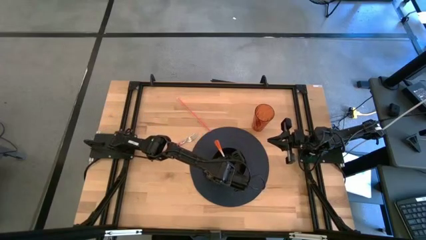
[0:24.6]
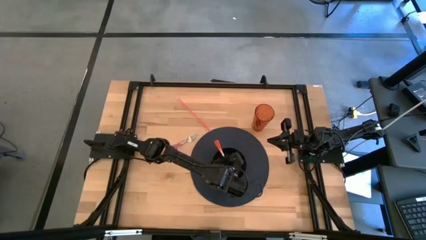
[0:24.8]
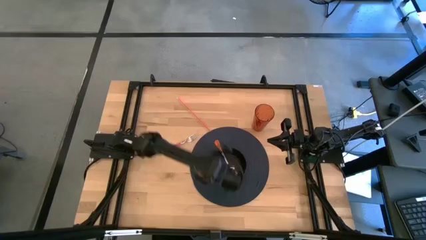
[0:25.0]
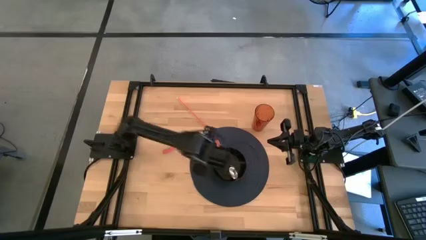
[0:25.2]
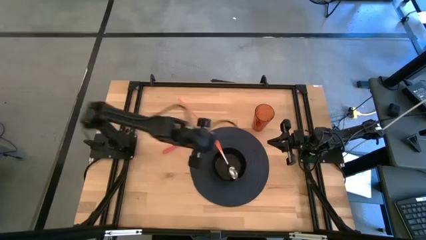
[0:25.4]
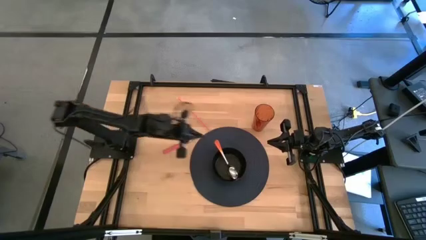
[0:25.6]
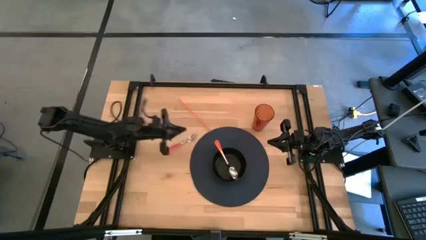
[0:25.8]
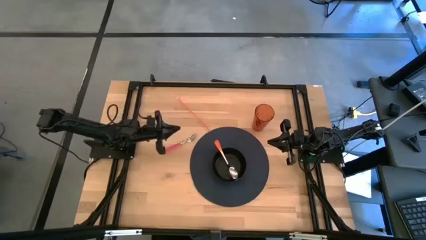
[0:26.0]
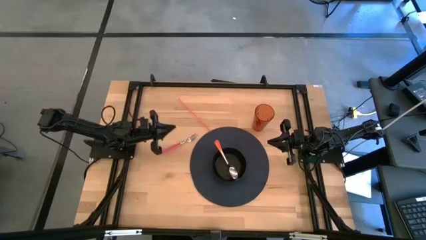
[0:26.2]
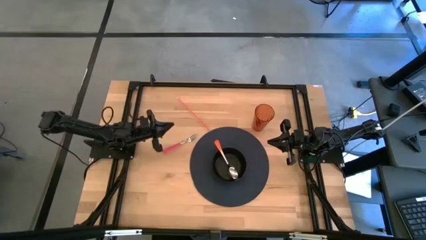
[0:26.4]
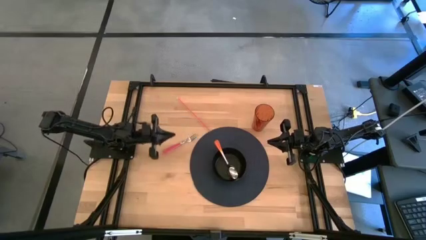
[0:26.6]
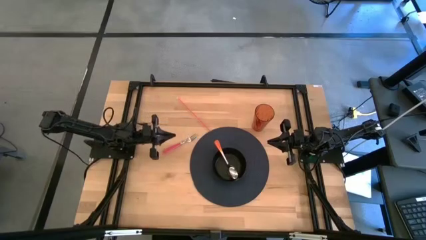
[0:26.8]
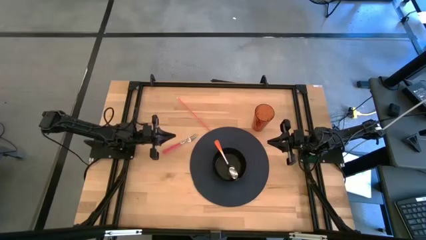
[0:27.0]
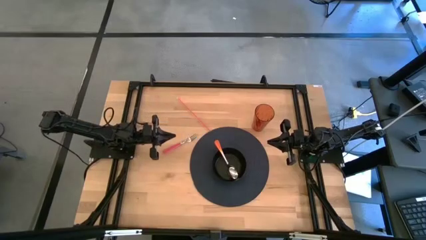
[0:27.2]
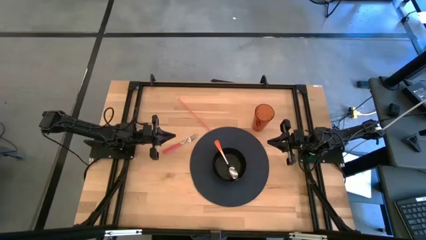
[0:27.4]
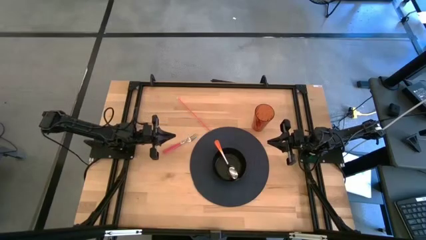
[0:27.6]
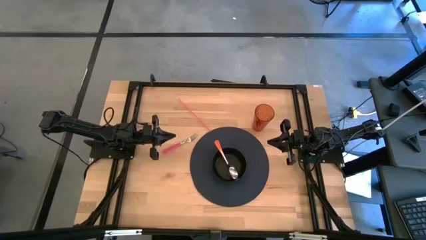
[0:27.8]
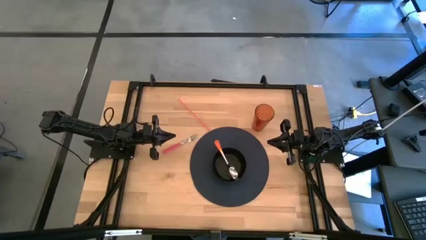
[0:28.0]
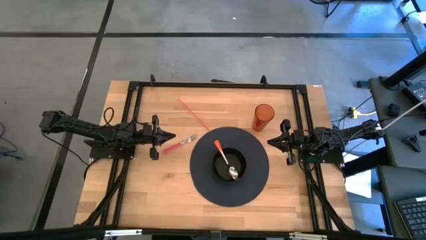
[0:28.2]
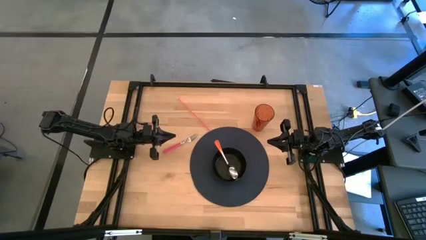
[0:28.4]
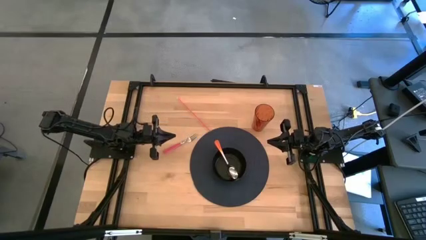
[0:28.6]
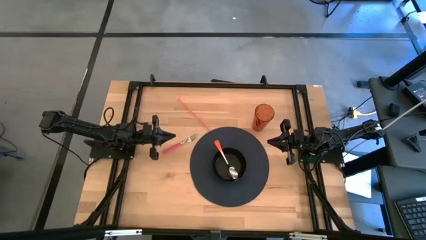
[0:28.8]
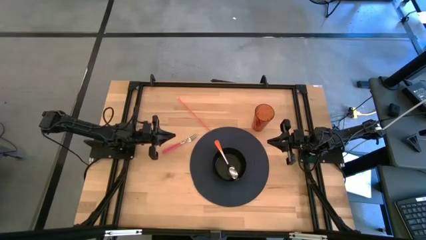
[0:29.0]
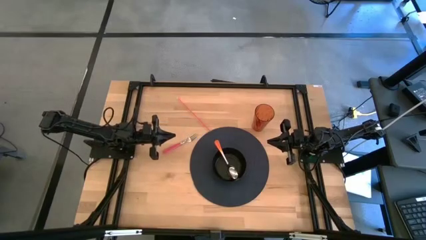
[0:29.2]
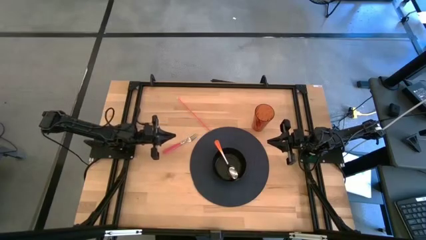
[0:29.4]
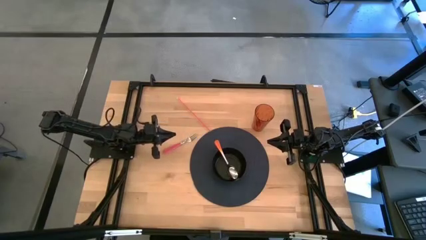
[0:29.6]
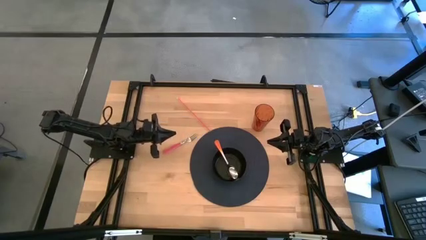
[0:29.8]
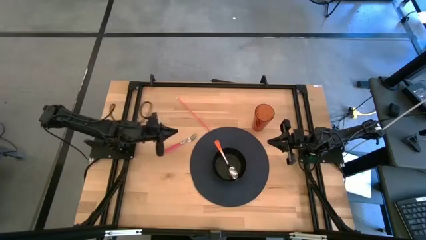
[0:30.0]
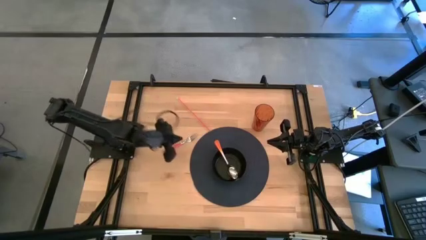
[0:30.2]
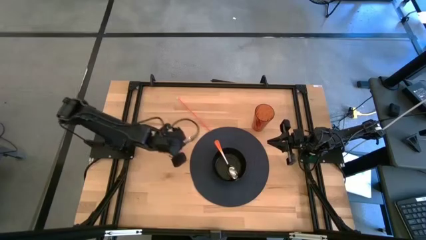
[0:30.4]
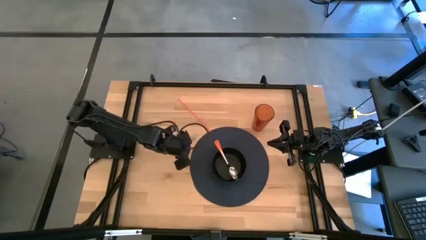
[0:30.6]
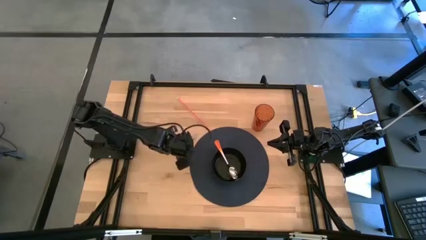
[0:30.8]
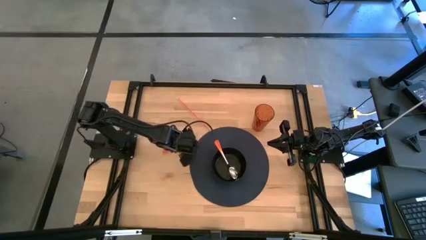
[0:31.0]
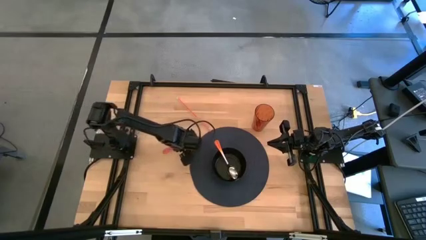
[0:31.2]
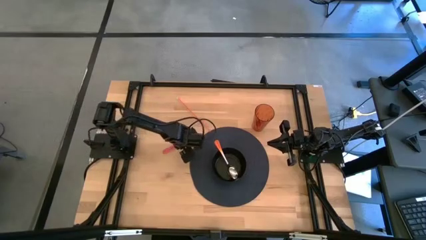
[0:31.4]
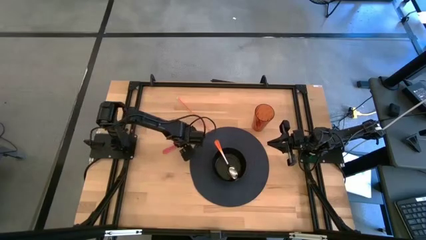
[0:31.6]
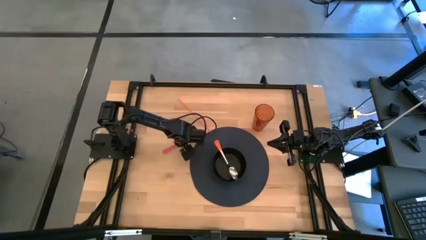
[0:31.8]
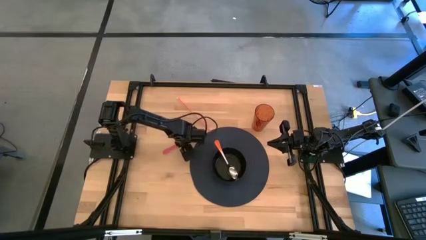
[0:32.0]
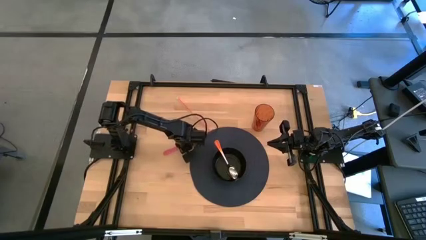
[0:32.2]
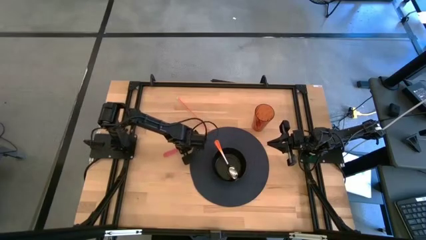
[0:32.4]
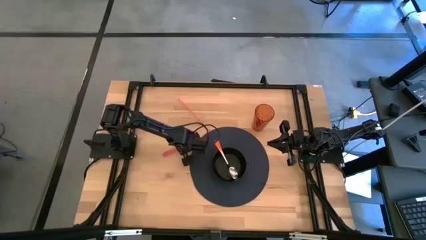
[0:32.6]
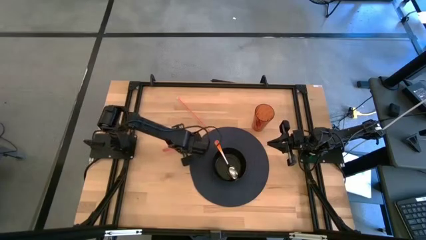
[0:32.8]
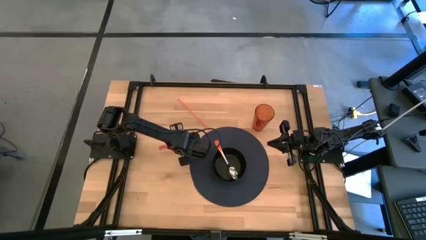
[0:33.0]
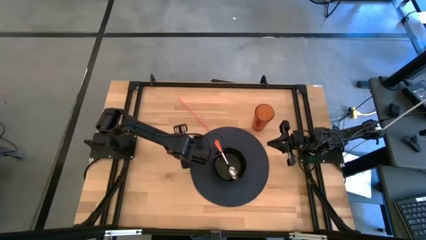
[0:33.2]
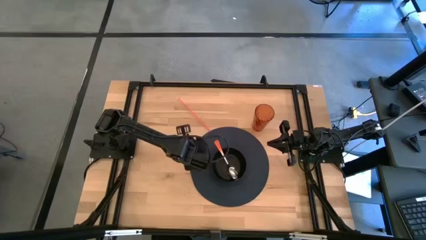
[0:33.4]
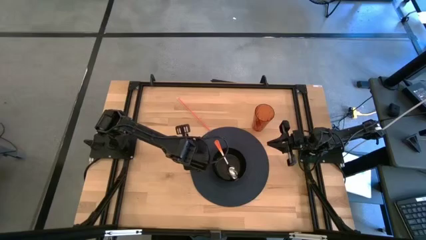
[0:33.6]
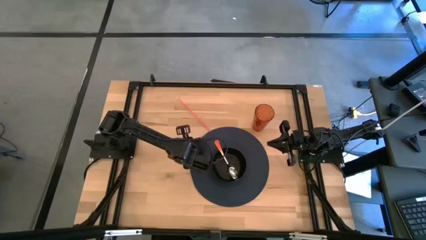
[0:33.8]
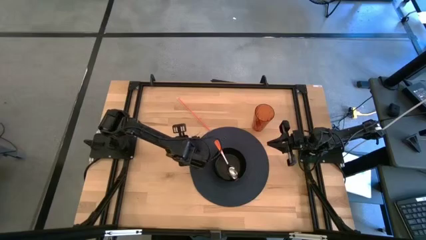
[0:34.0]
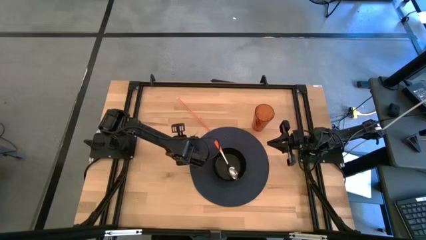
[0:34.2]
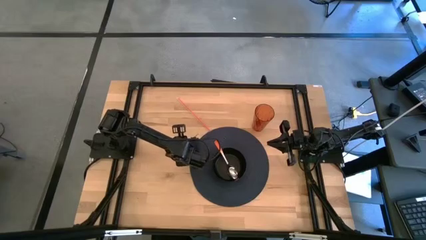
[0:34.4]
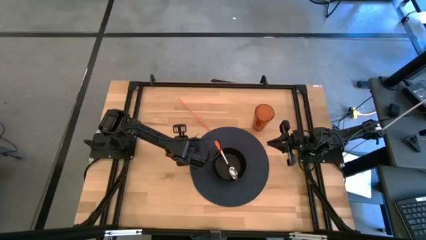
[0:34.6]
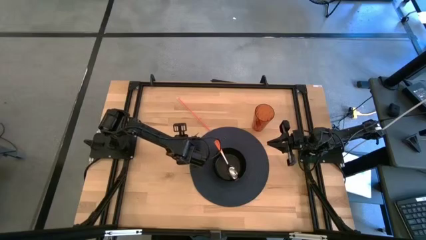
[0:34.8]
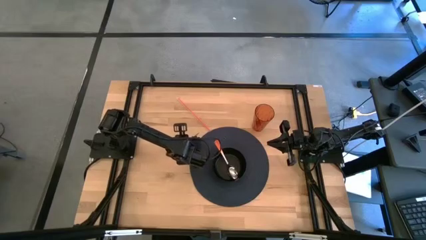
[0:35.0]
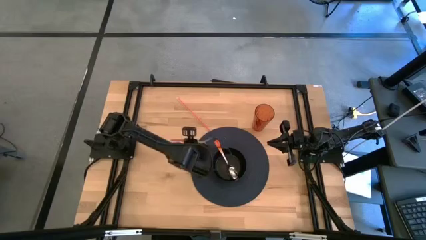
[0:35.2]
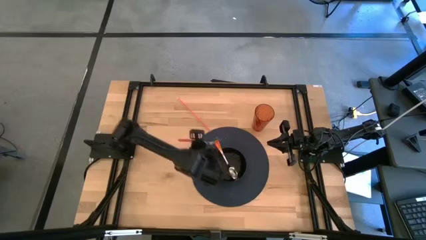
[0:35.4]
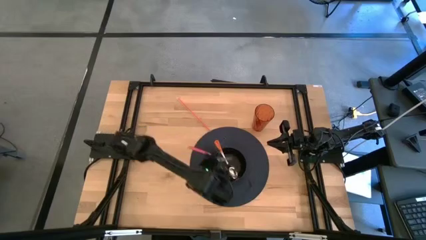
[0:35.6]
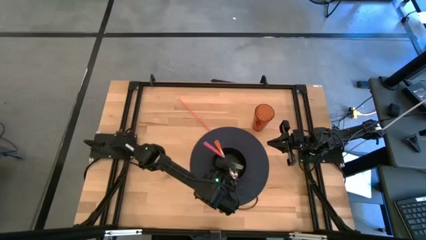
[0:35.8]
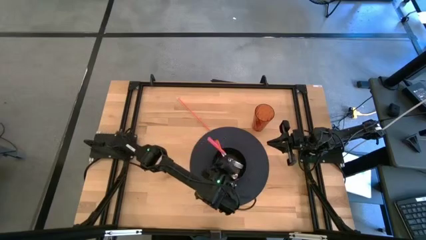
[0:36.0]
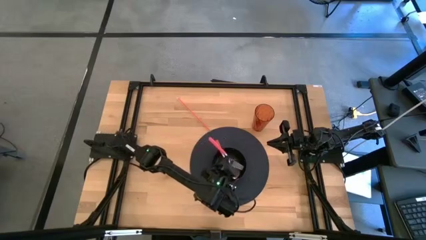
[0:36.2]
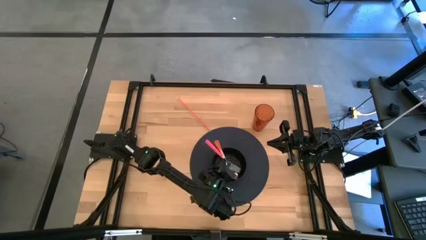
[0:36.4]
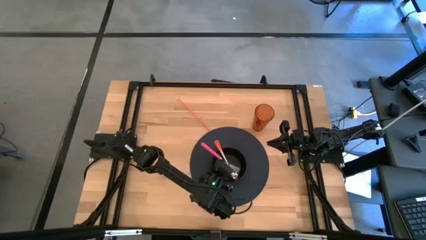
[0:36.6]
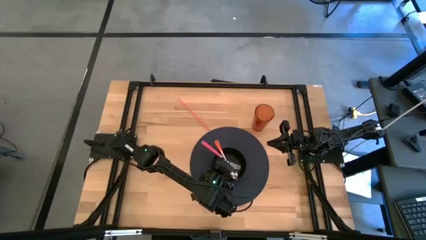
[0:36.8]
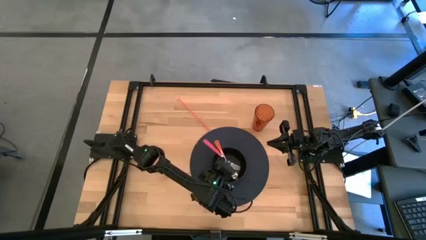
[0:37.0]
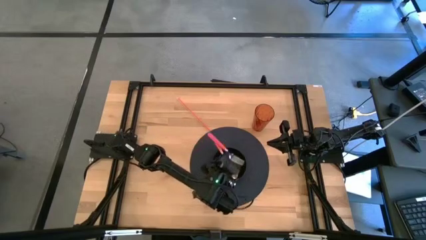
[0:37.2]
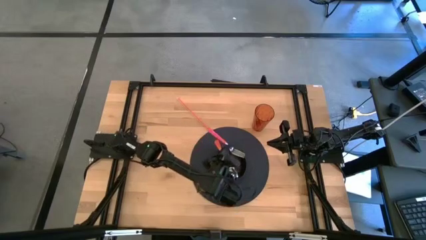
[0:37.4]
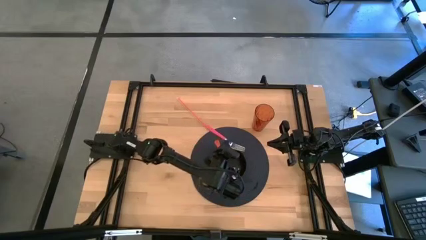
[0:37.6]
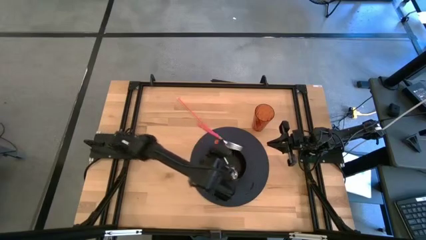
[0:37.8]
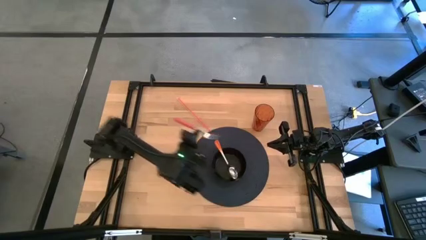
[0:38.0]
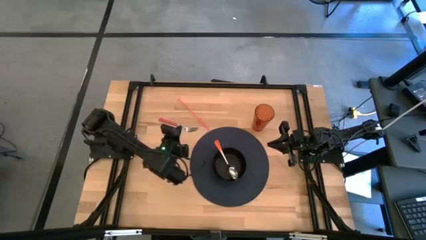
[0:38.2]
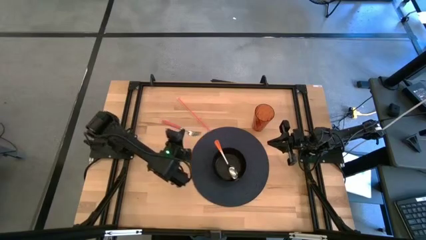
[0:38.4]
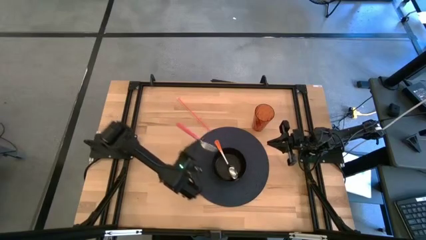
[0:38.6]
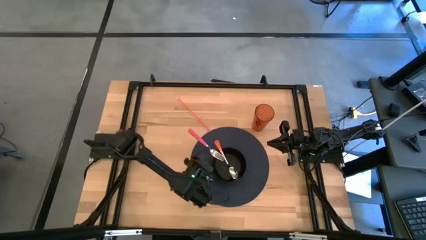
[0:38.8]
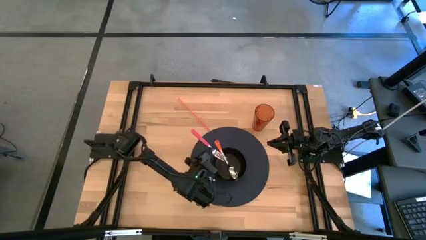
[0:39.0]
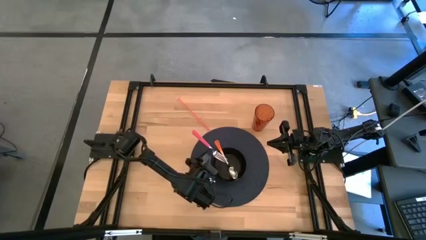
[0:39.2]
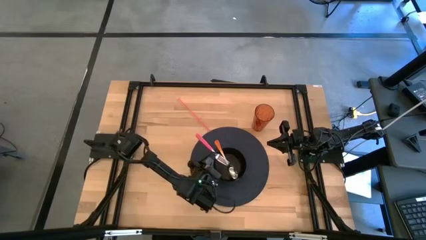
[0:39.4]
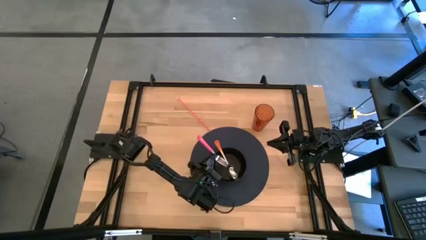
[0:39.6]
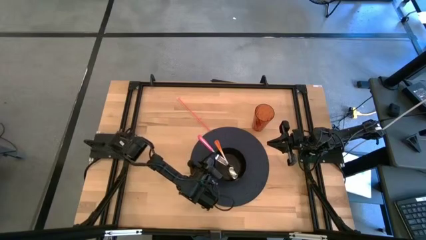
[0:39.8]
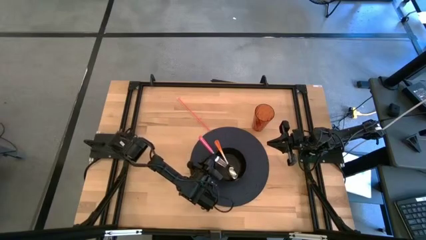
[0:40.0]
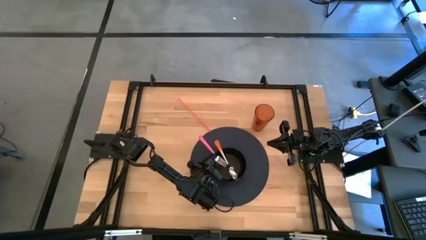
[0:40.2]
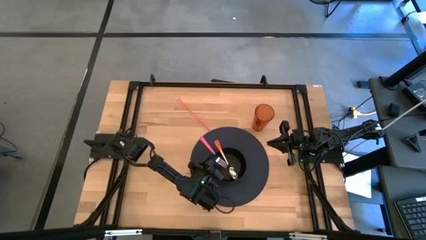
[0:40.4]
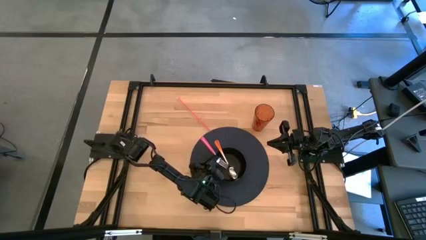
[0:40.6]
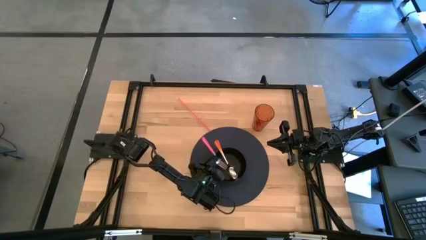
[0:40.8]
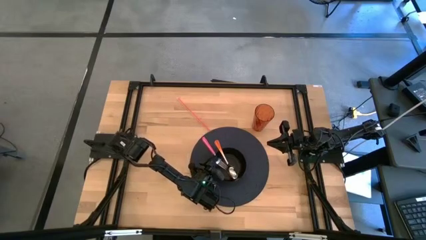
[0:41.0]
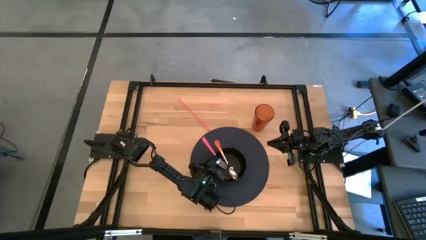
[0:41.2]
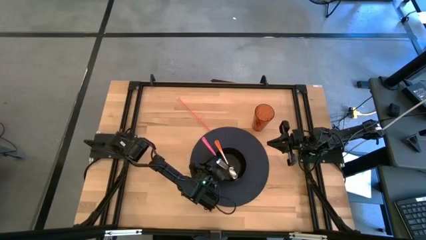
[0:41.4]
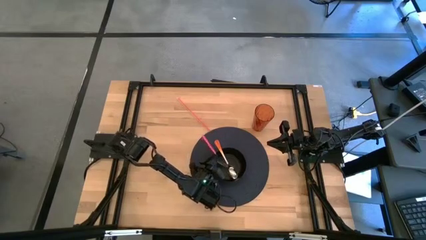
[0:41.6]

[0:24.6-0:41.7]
Task: Pick & Place Utensil
Put the pink fork into the black bowl on the black mat
